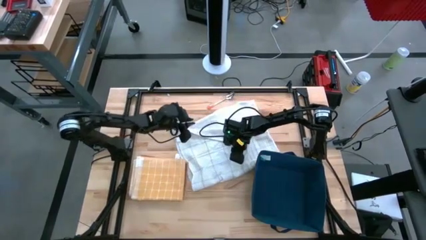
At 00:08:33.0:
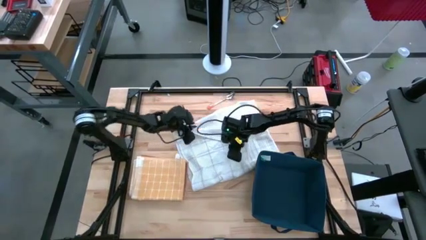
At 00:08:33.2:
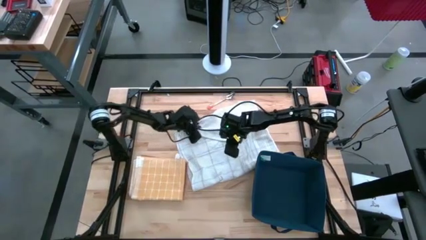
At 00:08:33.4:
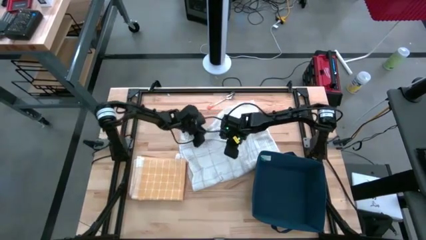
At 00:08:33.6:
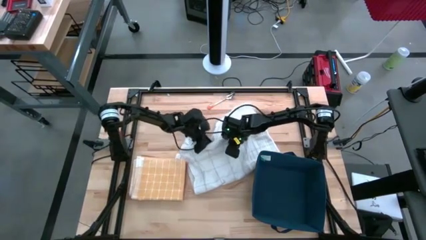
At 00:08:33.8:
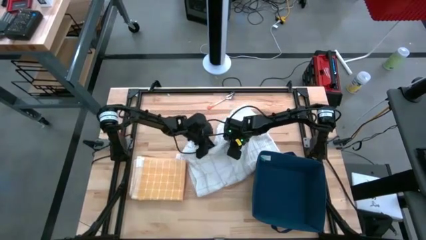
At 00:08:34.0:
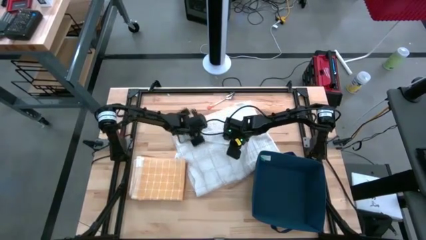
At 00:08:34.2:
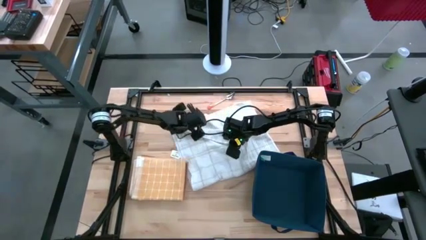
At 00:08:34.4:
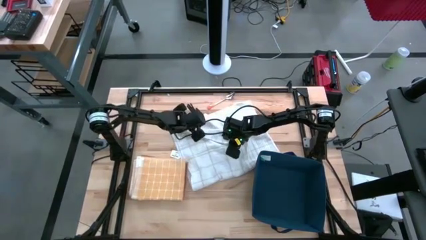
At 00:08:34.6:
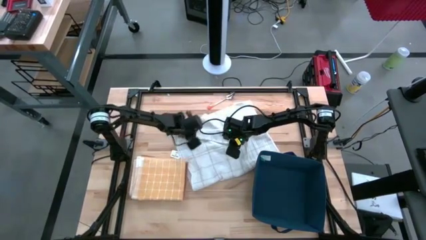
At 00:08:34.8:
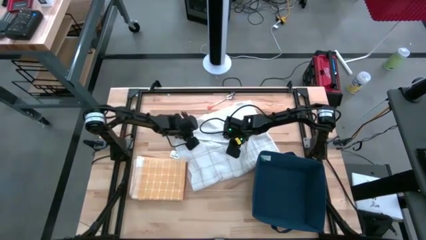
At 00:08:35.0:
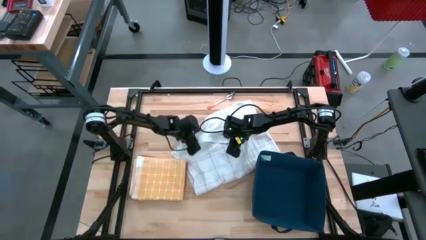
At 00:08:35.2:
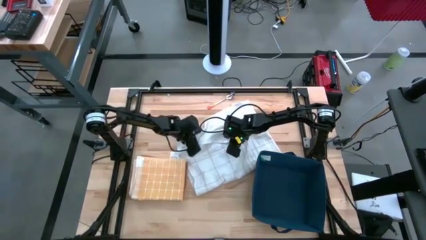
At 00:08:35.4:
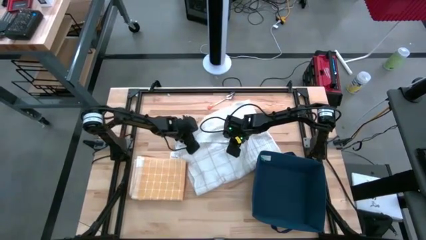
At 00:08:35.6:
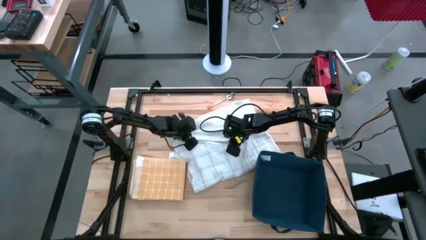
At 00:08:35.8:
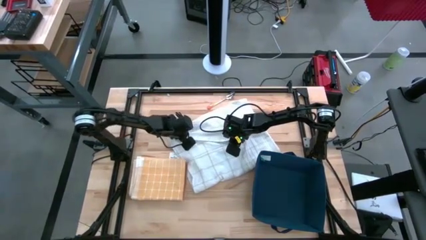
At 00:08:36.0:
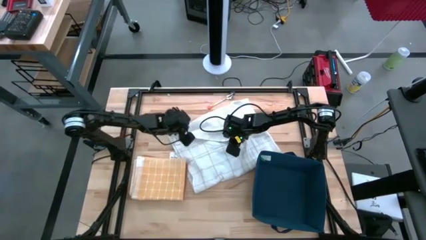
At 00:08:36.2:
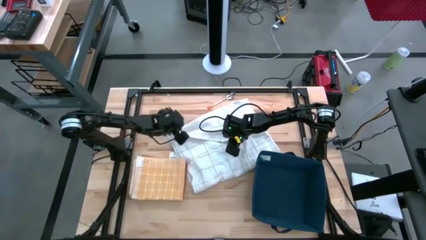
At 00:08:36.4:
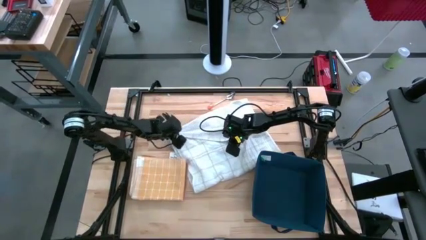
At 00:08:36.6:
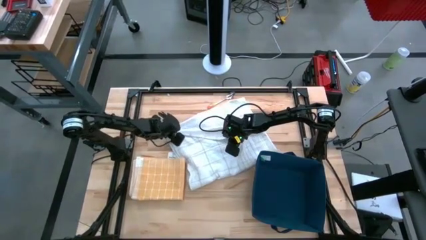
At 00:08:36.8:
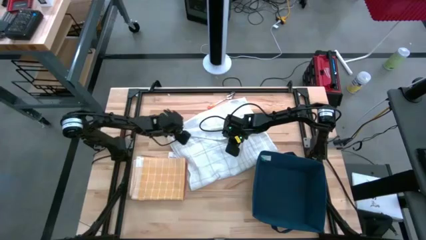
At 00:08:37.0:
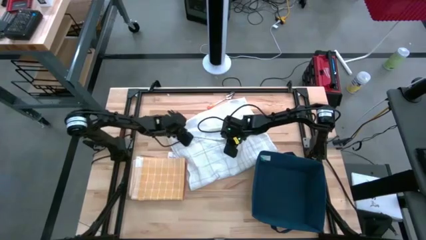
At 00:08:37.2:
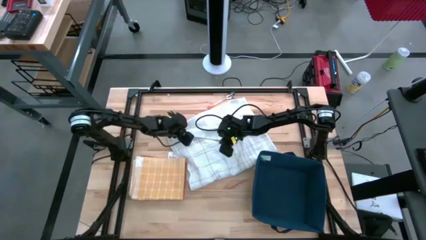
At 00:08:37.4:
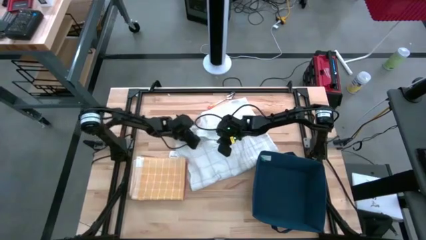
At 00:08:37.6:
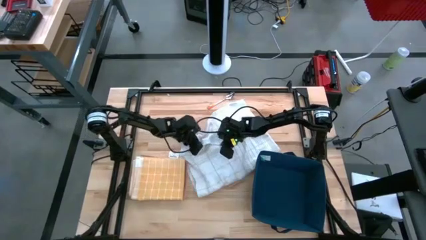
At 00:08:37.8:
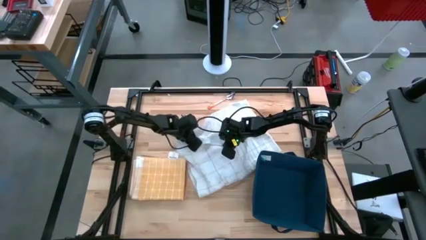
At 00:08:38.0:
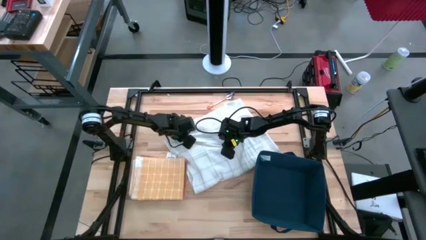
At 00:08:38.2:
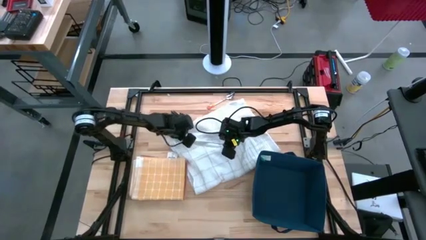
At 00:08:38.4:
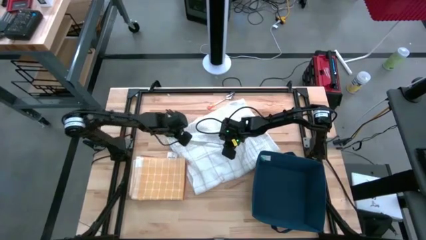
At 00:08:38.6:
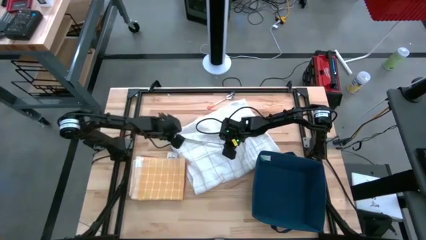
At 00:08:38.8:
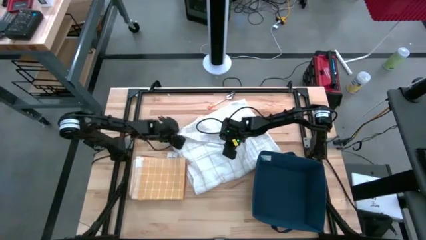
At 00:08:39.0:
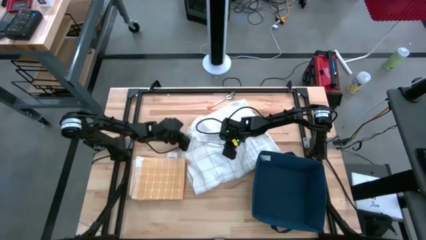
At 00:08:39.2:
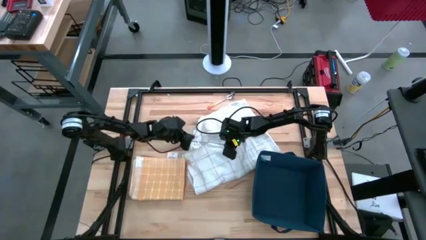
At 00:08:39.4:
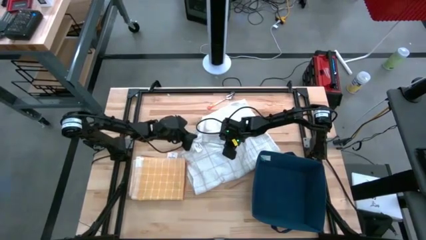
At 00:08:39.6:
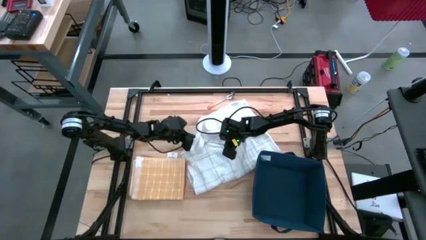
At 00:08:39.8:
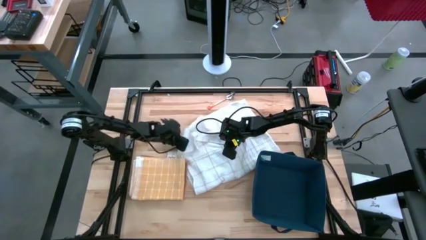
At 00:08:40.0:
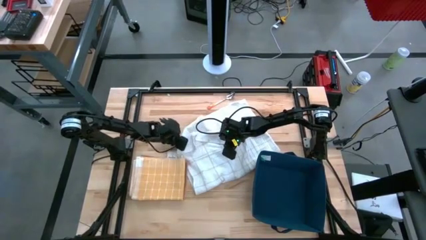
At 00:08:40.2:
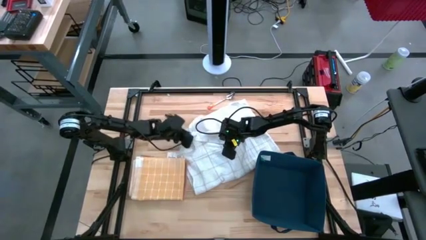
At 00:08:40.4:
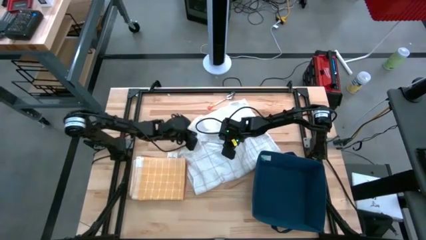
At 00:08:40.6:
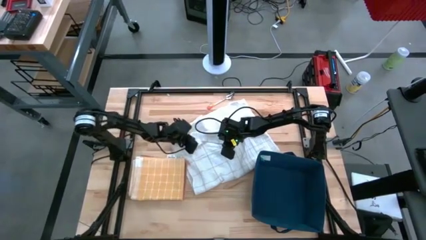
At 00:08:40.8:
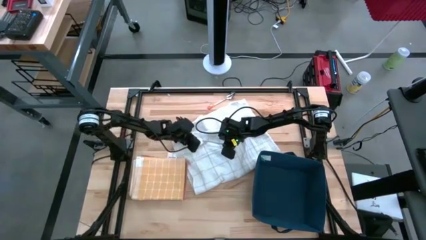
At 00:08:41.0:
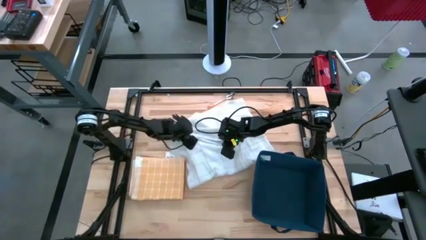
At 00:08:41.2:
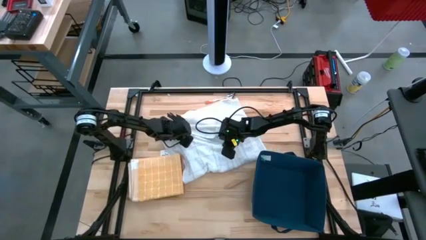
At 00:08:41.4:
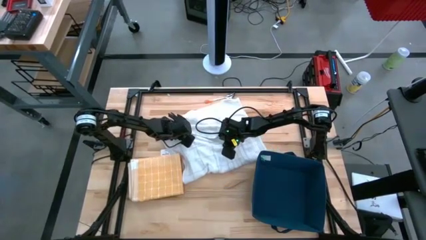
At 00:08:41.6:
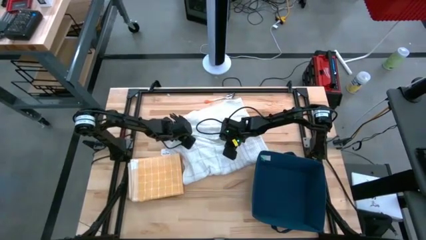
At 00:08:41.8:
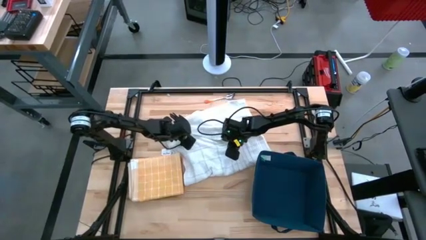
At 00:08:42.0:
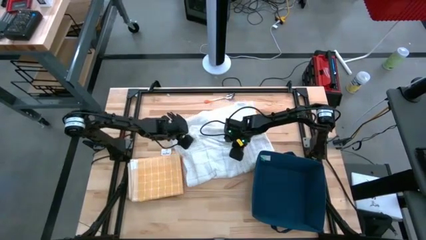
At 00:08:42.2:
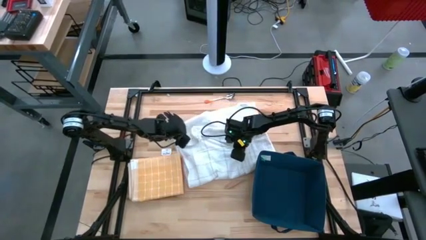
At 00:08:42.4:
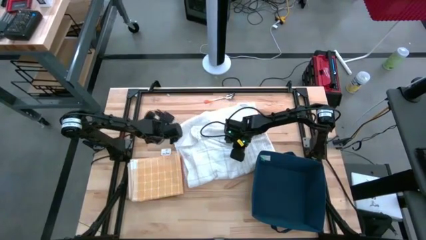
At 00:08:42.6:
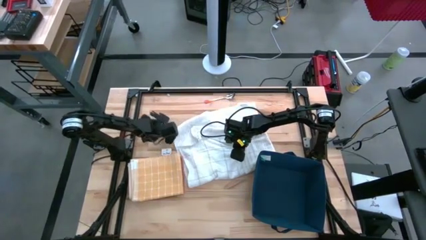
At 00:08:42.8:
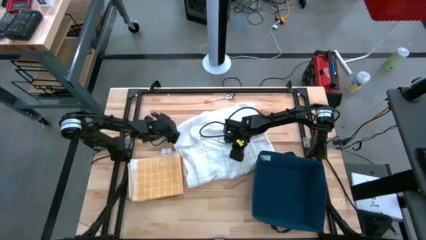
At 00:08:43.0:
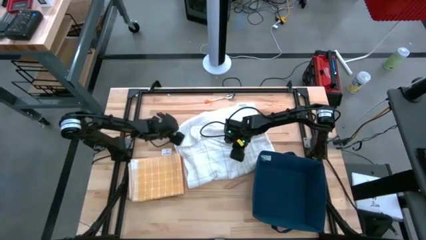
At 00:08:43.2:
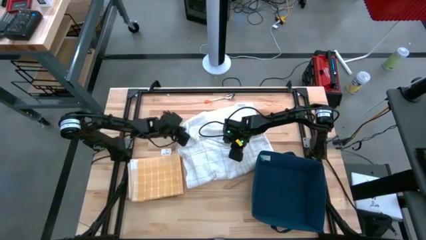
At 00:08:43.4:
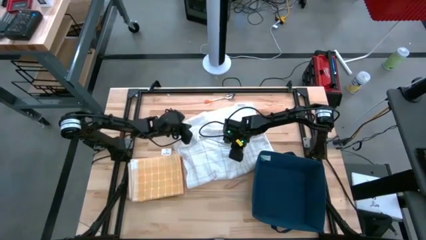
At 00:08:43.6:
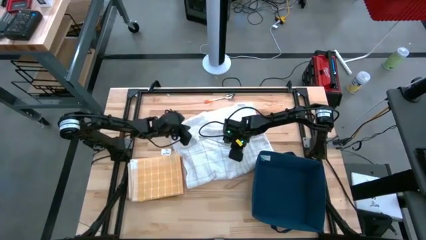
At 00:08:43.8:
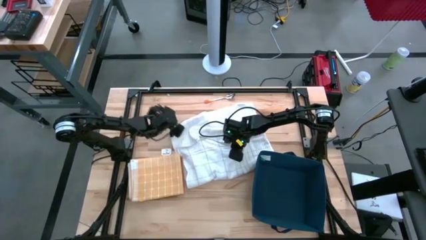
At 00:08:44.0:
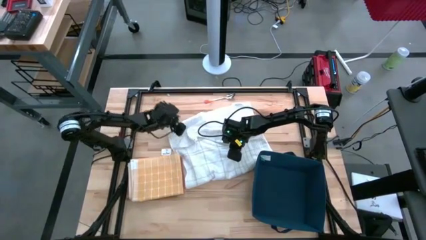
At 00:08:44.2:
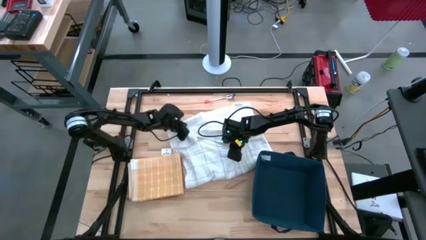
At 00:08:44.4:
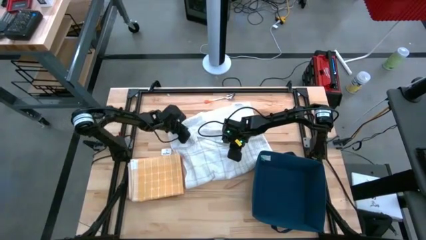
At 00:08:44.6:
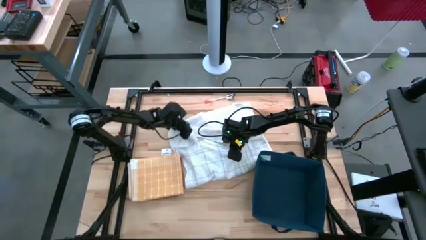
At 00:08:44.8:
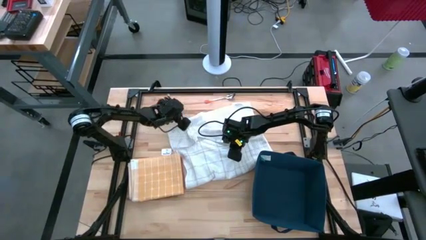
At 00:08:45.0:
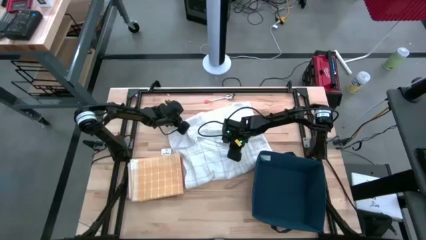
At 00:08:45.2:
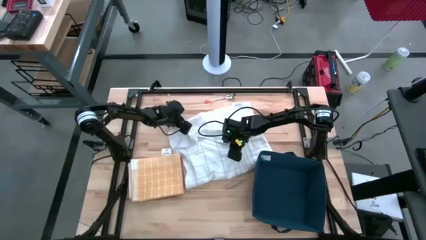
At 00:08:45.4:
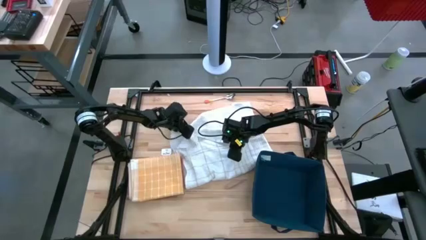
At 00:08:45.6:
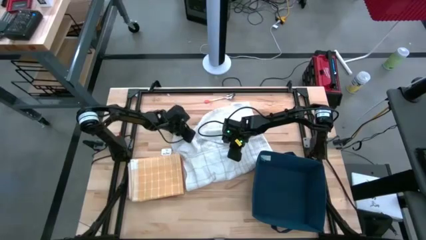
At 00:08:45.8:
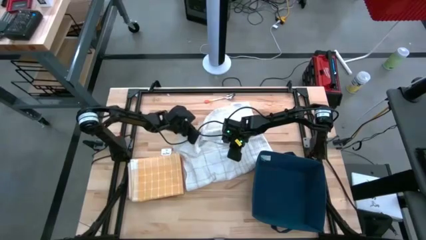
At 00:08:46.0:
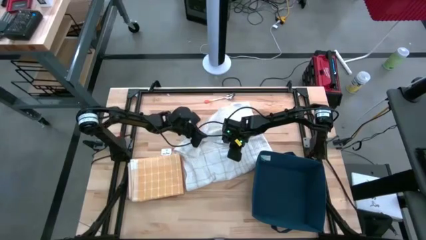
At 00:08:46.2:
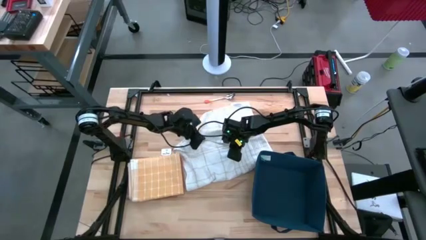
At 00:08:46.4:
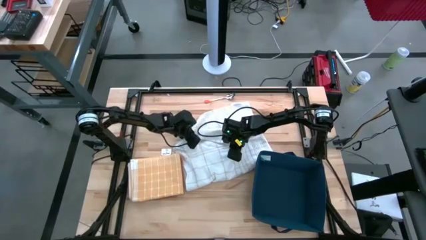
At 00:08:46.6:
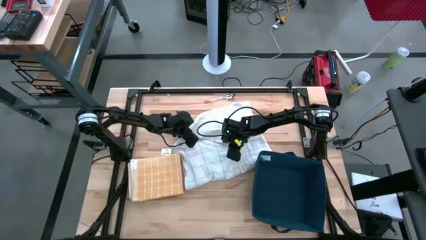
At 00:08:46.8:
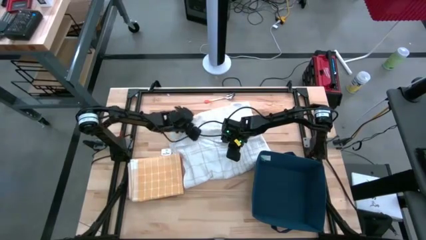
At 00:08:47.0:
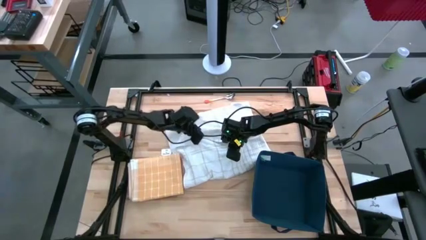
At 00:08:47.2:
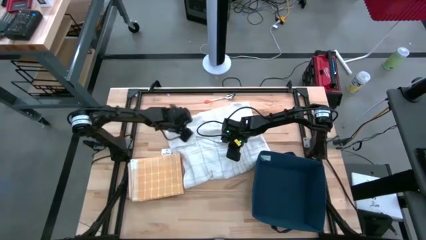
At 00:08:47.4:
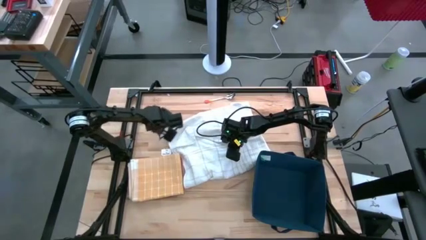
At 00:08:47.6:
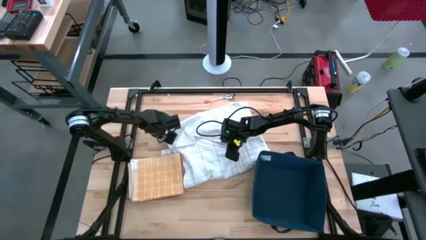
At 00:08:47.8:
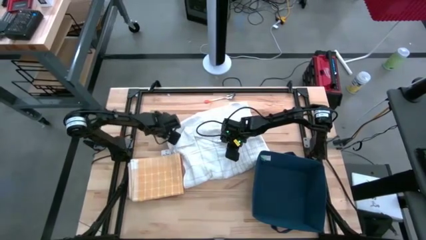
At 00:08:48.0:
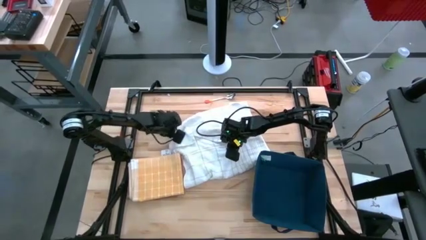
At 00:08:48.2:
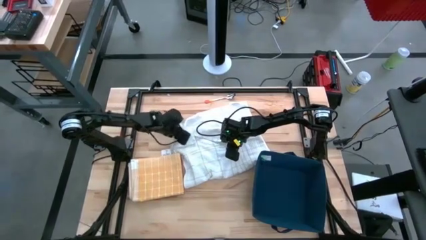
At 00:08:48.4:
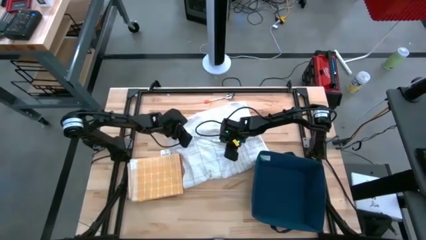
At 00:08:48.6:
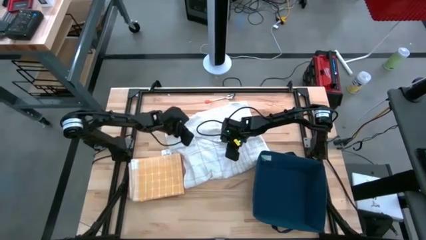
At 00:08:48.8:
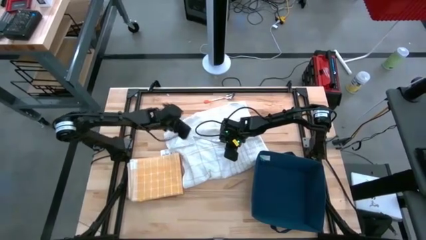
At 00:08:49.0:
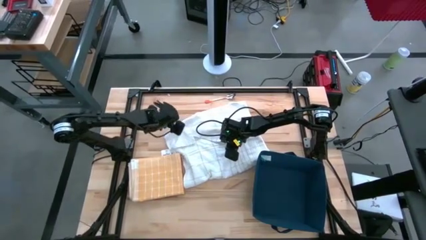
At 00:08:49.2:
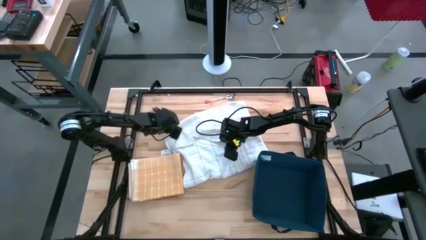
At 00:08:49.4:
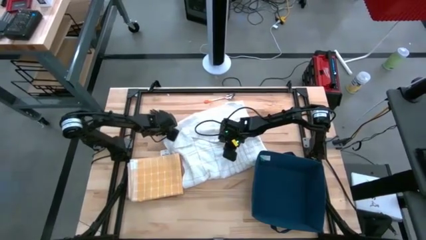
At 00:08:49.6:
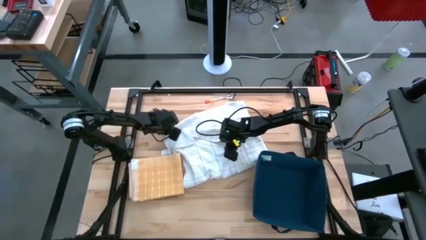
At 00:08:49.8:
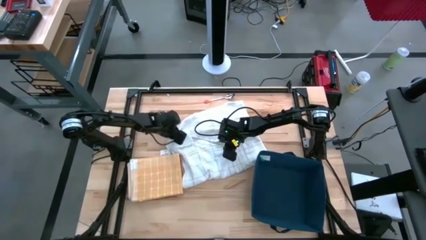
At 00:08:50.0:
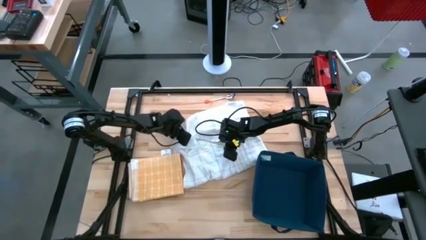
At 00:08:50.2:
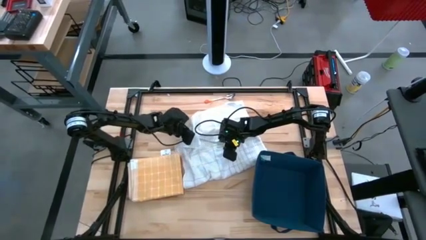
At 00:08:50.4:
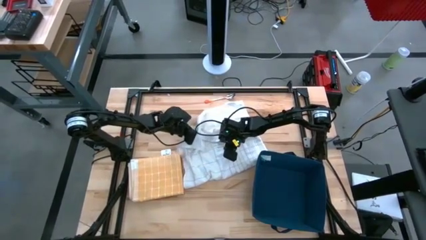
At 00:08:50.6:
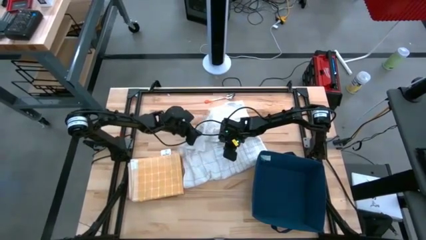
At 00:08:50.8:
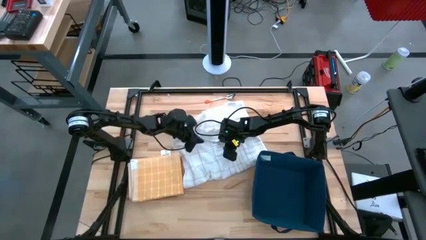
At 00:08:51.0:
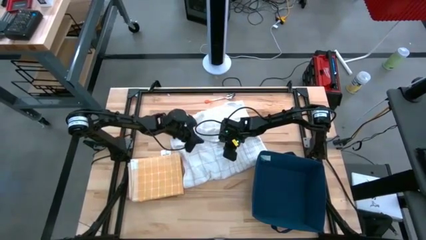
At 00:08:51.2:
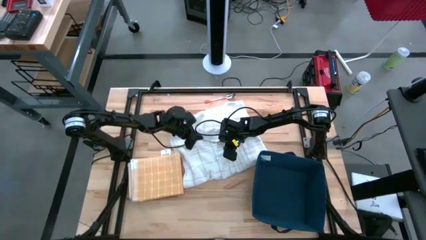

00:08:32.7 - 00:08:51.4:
Task: Fold towel
Fold the white towel
